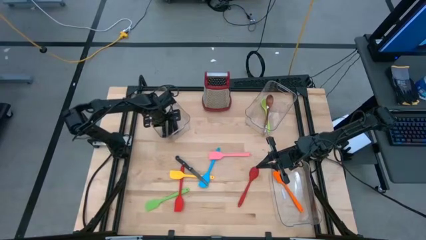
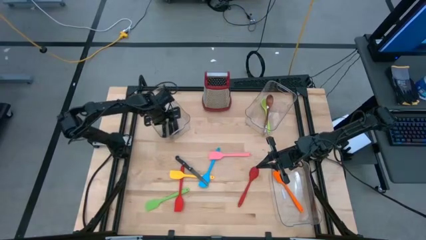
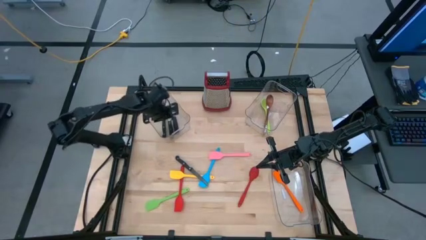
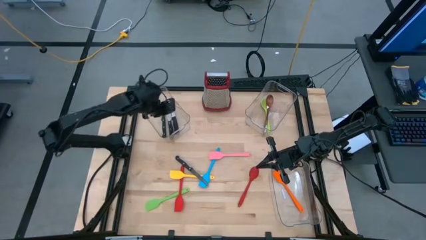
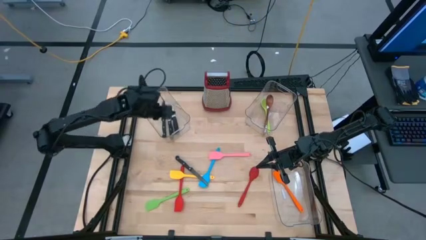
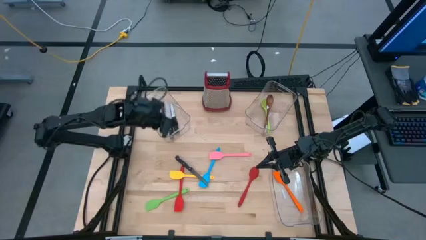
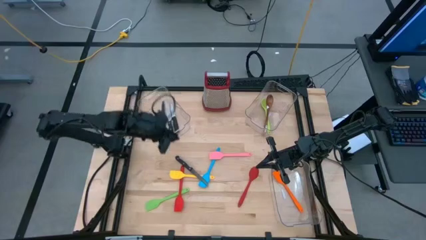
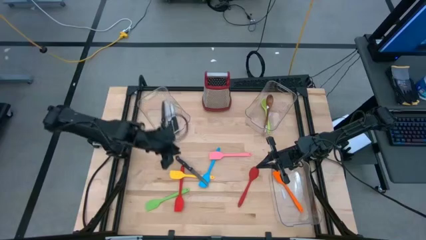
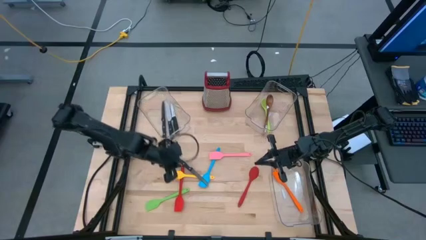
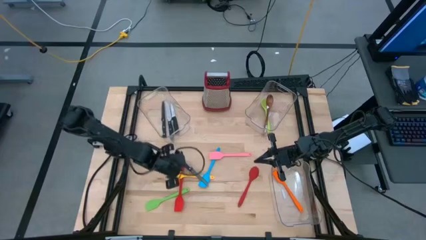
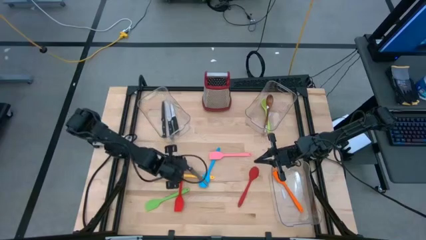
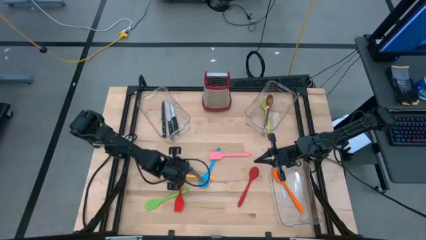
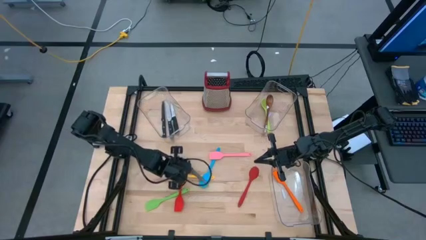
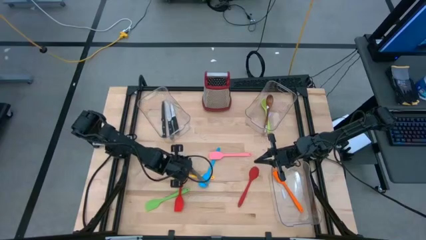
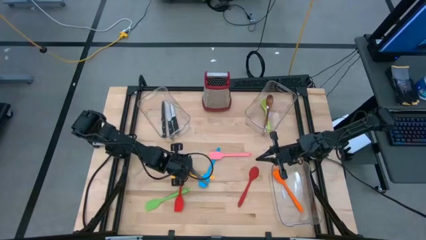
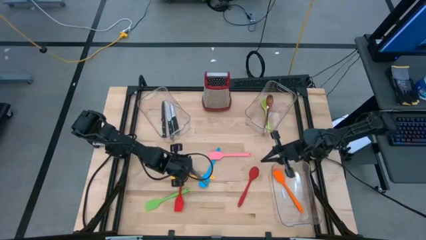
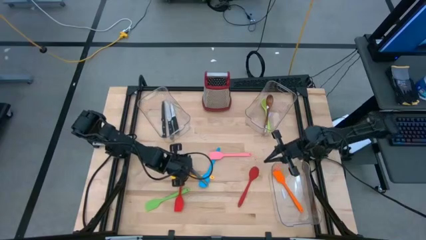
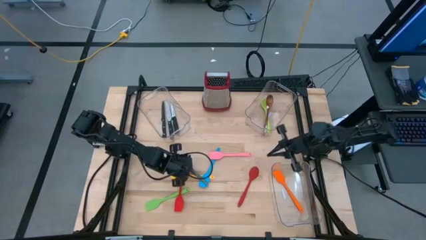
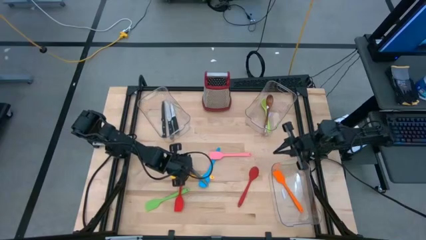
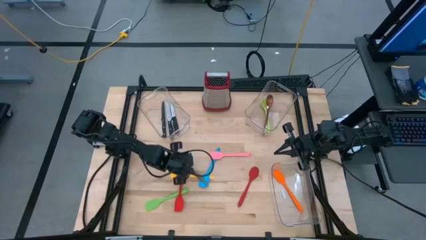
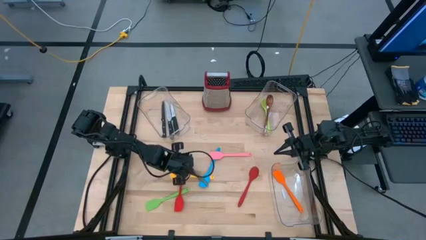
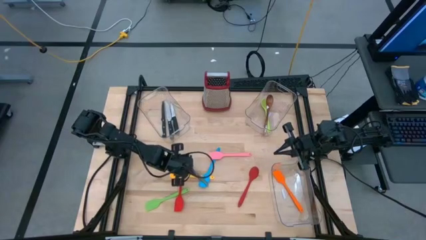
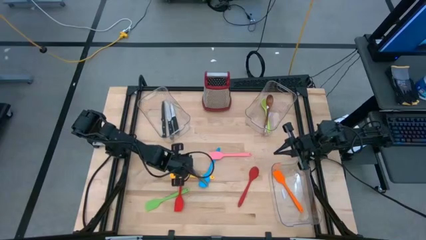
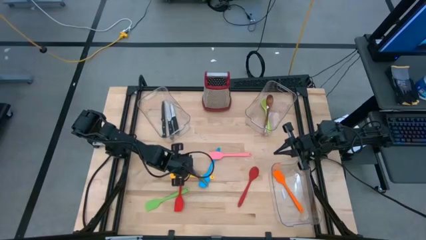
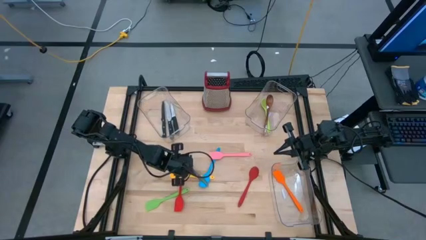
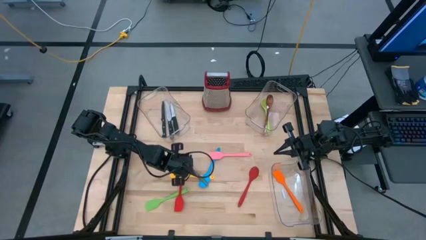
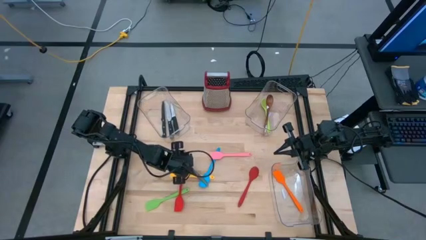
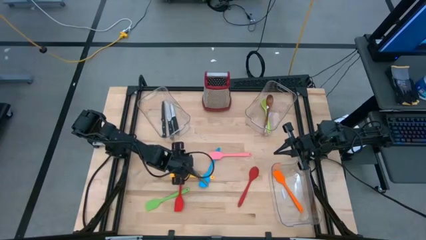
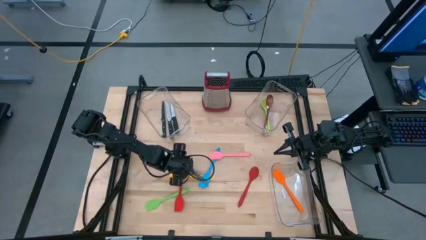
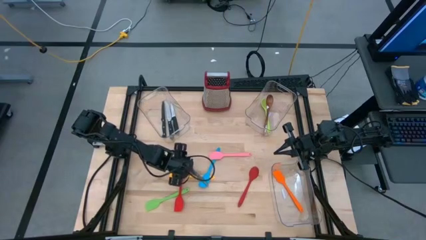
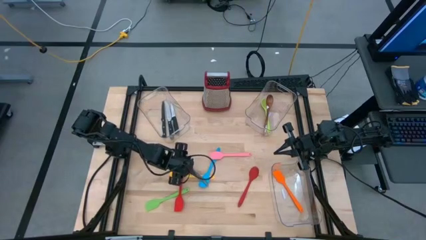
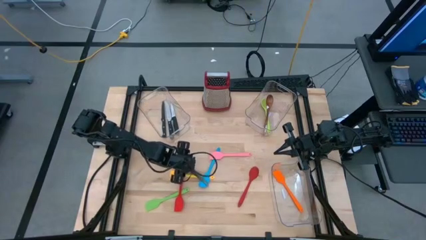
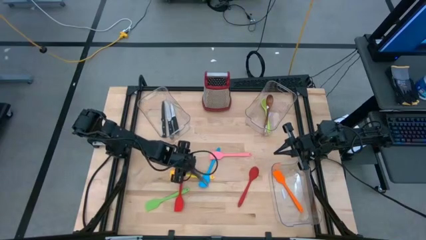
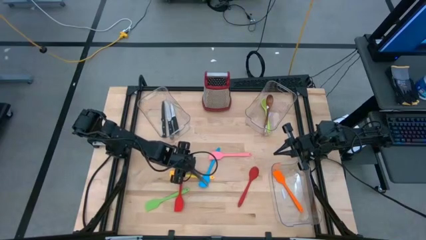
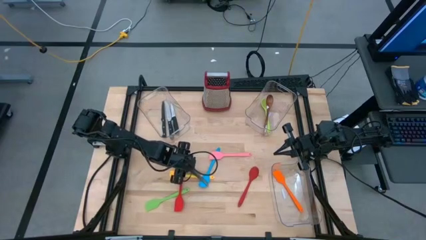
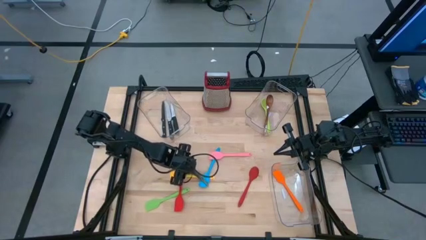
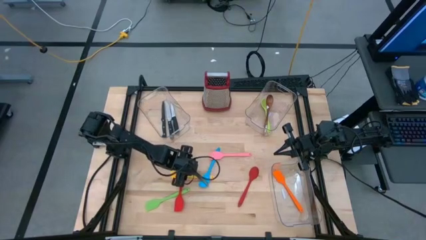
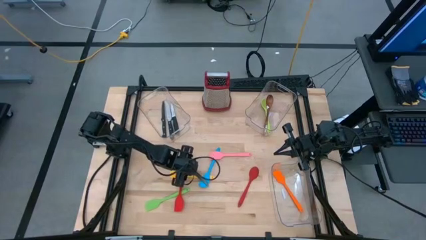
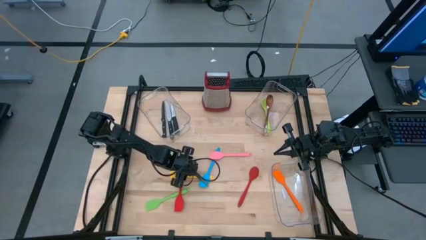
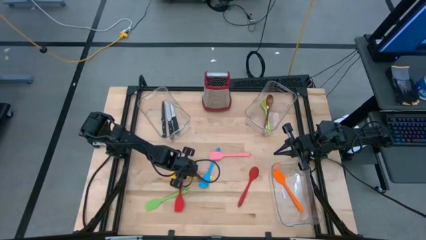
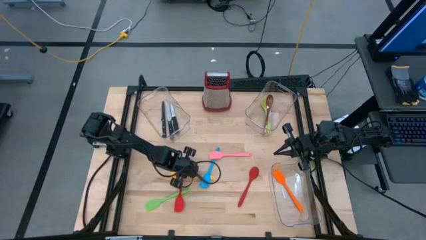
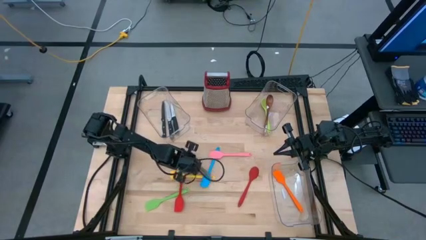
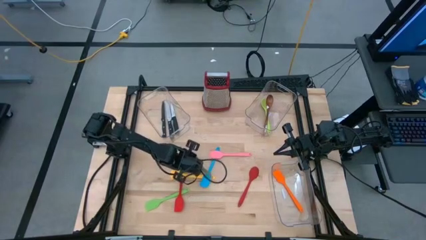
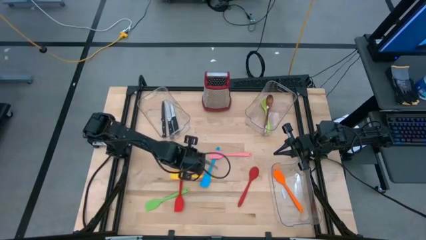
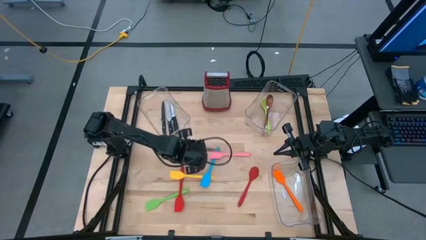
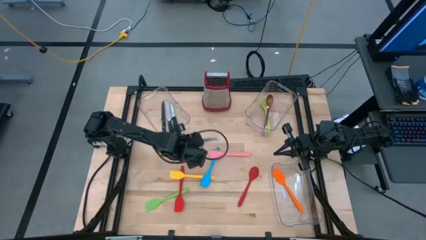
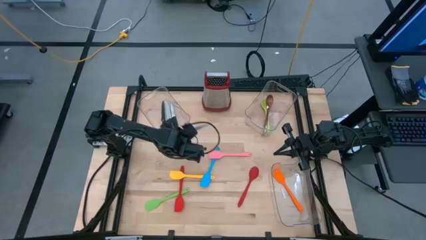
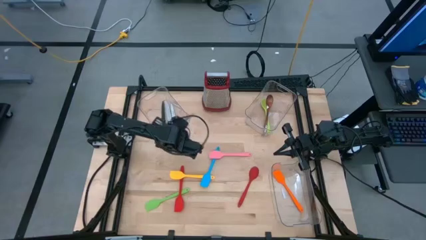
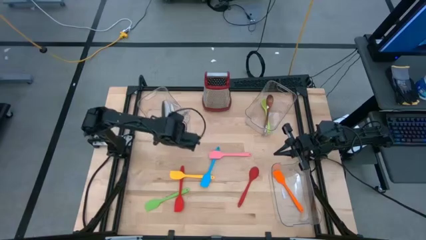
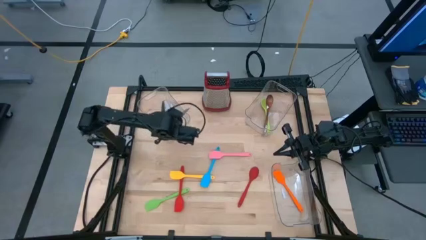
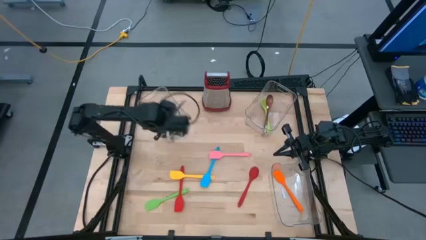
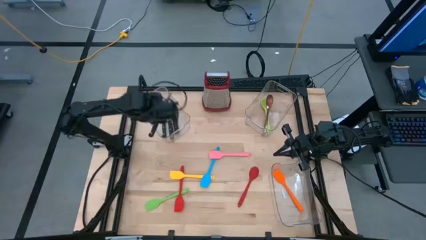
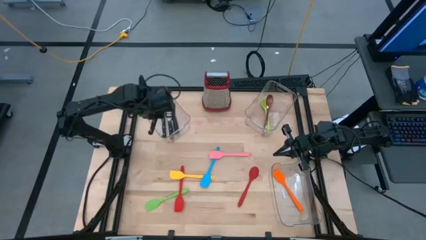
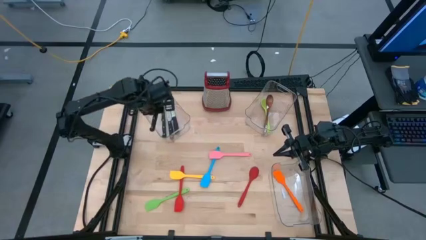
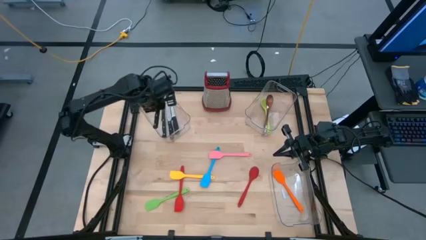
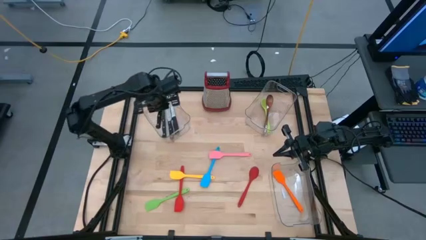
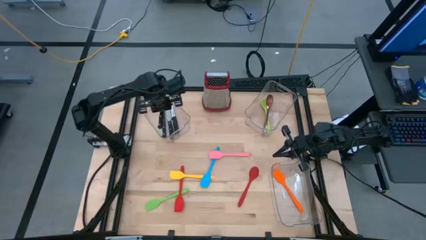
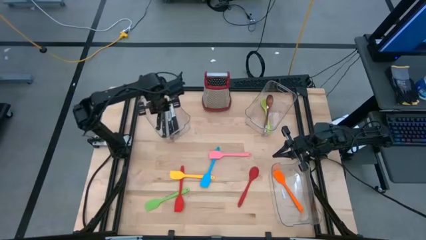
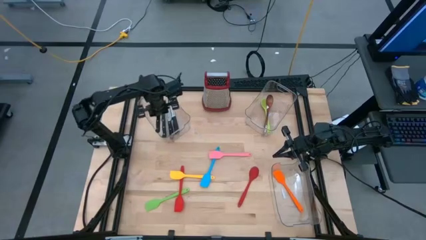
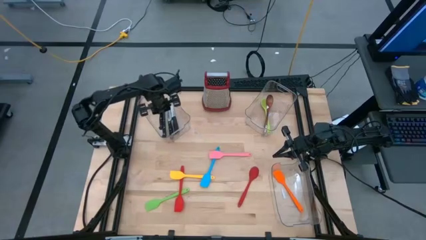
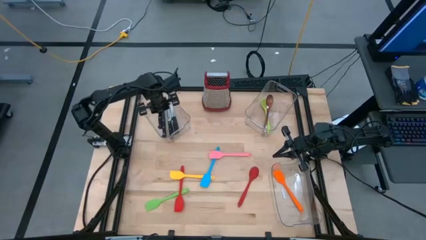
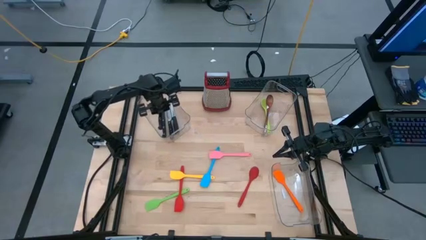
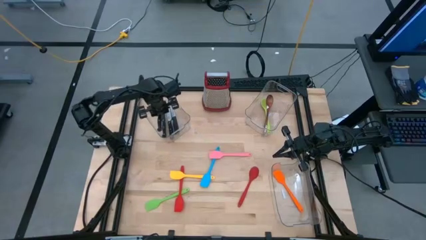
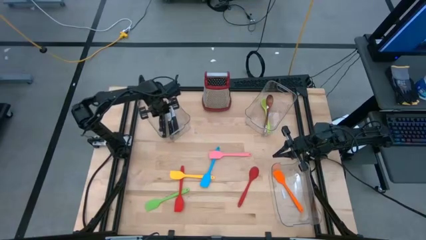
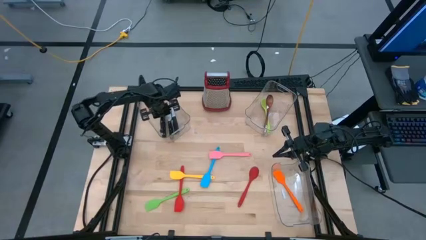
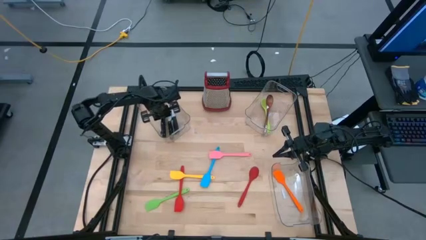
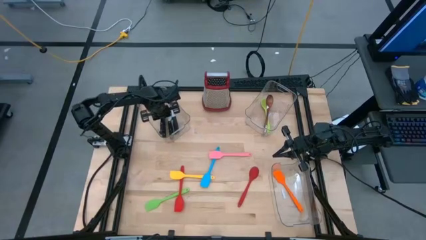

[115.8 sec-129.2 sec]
Task: Pick & Place Kitchen Items
Put the black knife into the top left transparent bin
